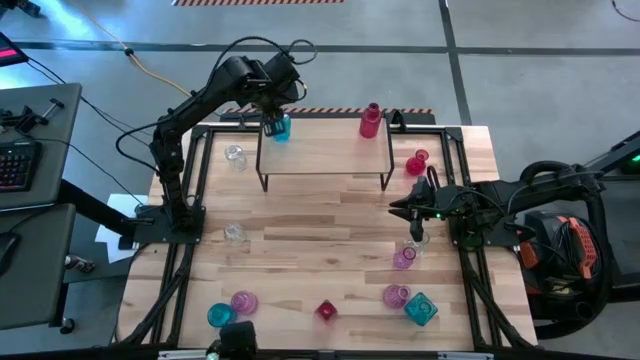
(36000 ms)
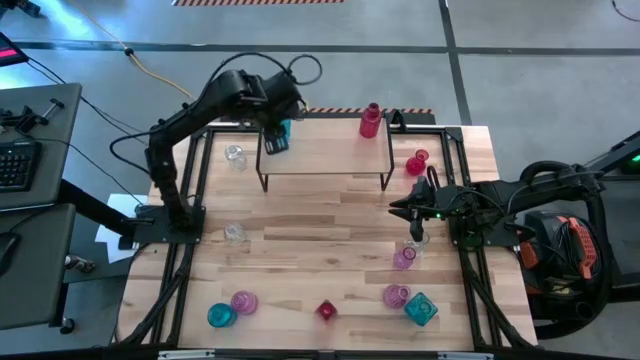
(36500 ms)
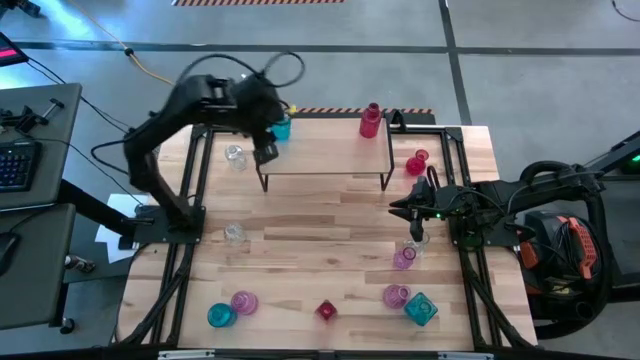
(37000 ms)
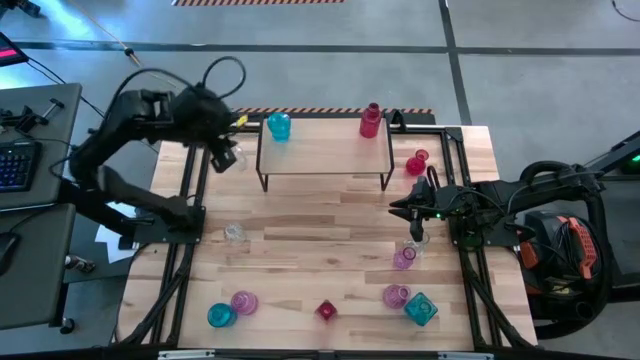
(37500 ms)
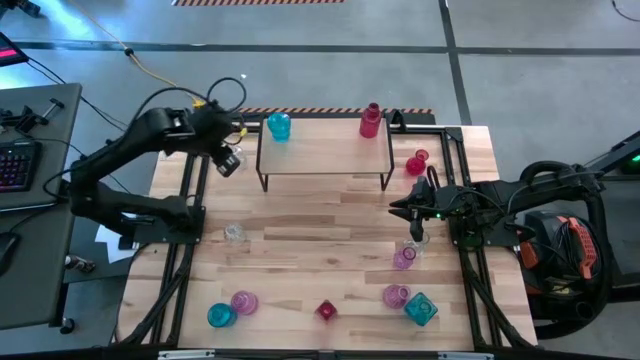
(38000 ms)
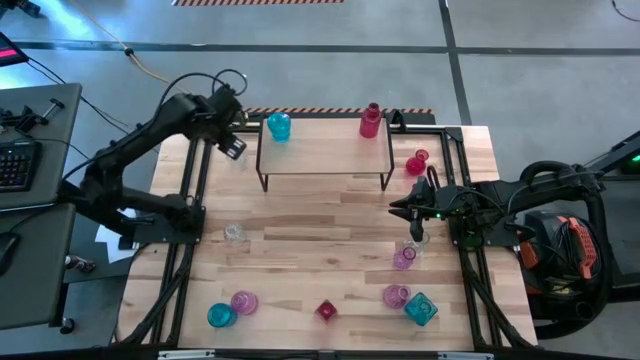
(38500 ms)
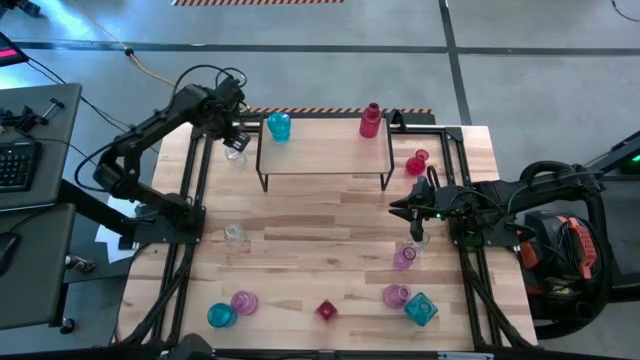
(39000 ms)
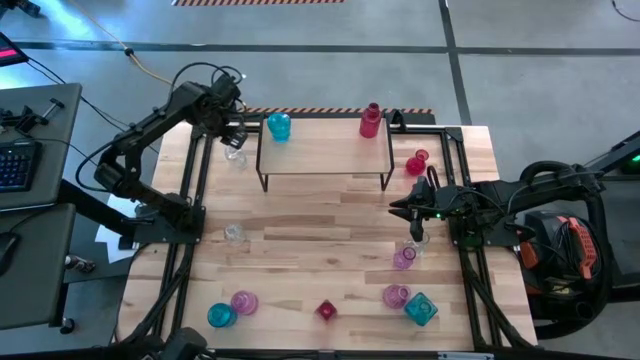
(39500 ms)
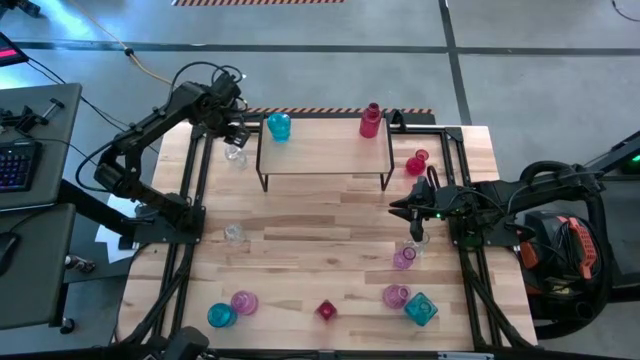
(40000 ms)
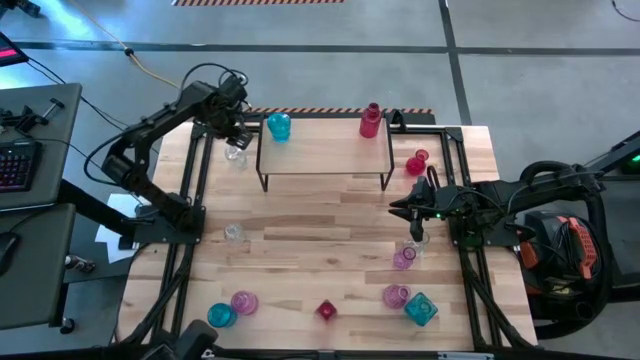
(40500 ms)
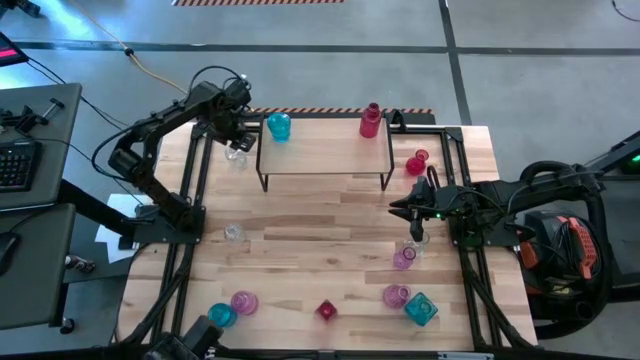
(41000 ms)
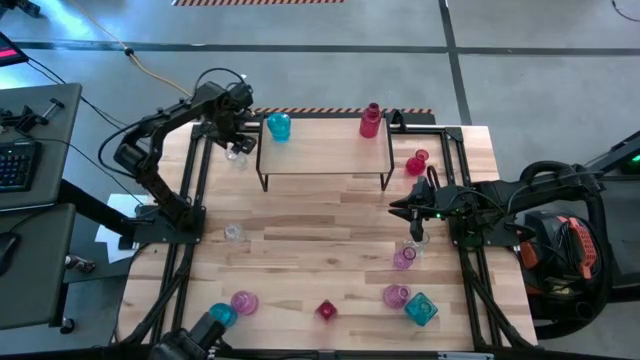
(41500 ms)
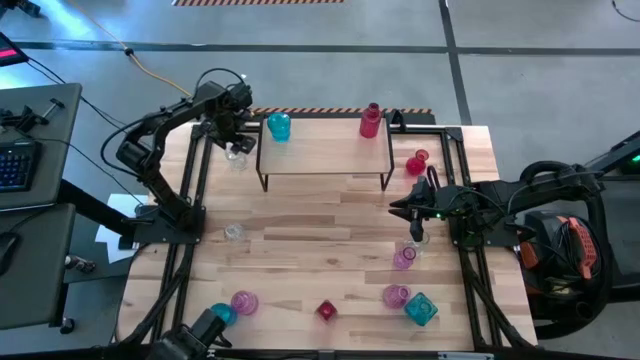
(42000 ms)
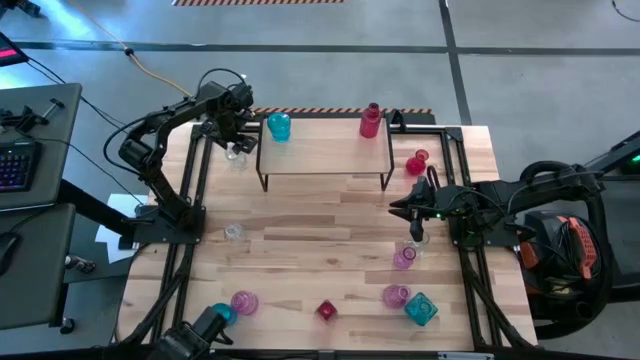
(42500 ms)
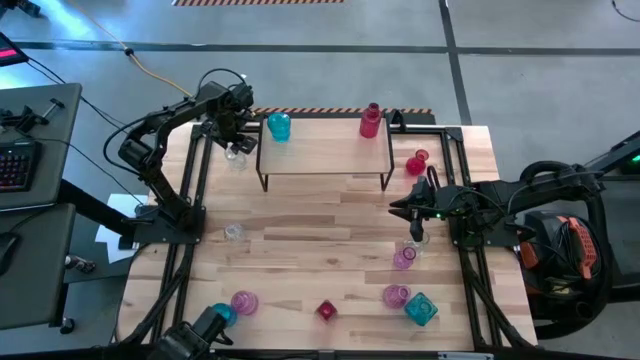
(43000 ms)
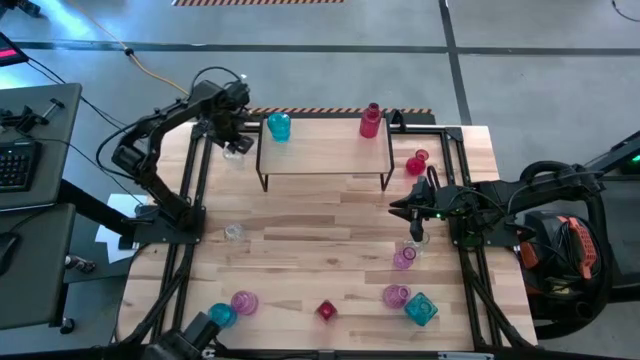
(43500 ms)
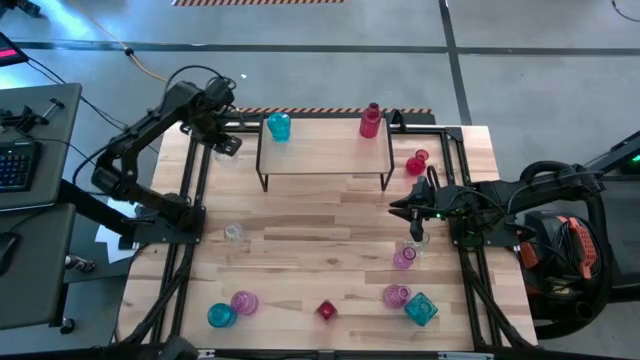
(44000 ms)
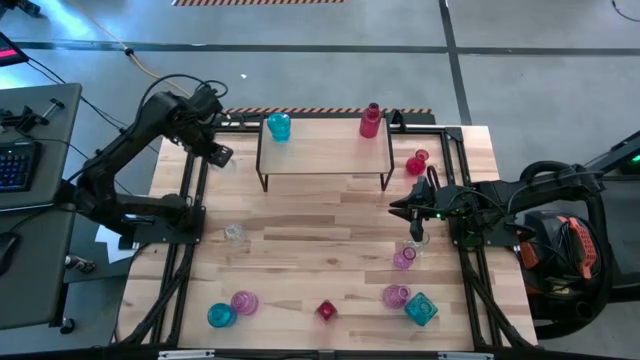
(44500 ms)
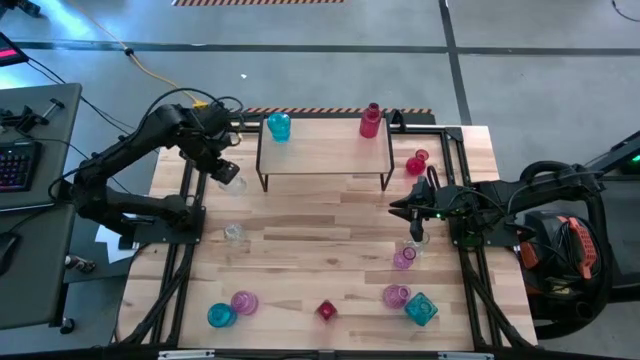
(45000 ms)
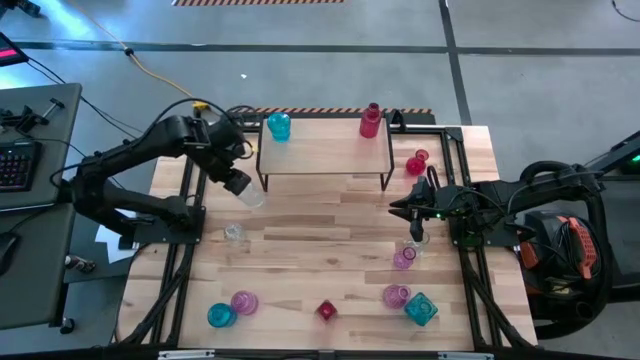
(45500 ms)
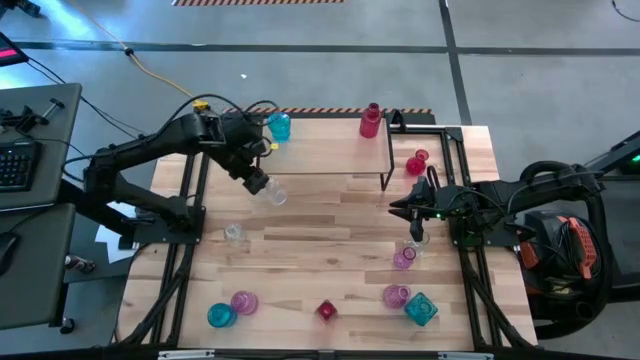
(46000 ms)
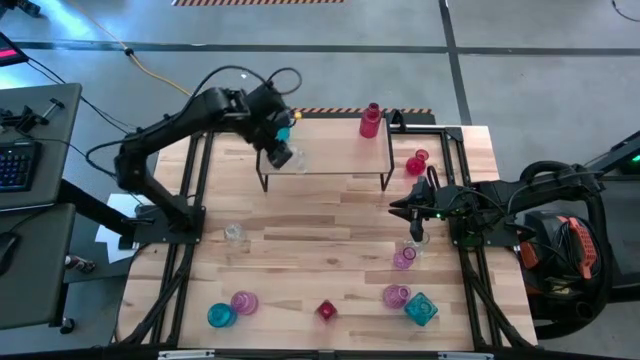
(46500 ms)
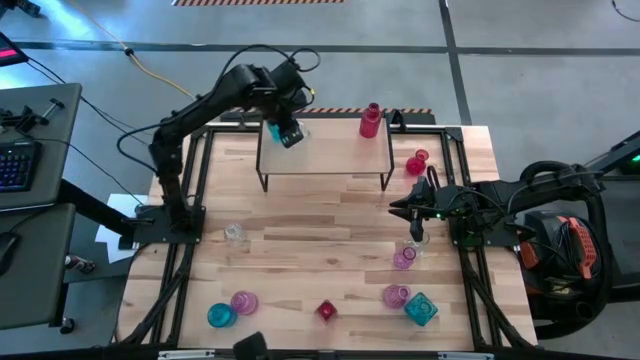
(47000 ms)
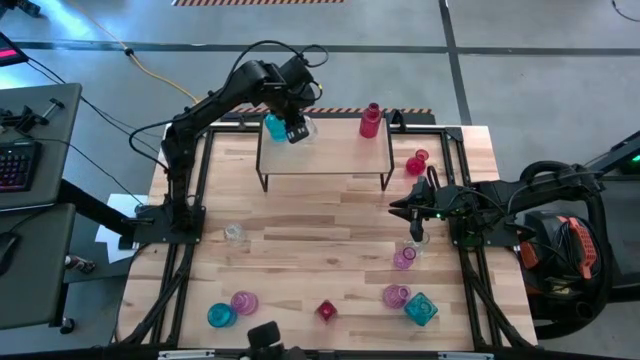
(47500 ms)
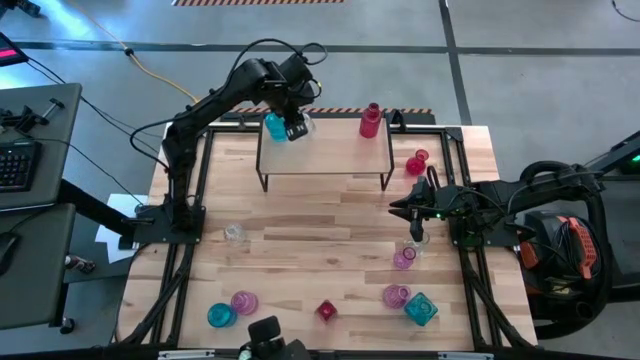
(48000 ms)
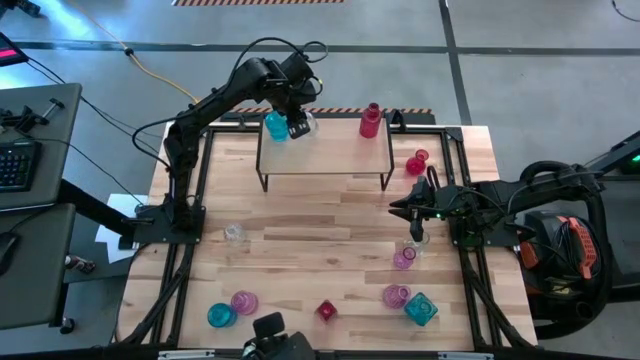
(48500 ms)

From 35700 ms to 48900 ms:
Task: sort vases onto shelf
Put the top left transparent vase on the shelf

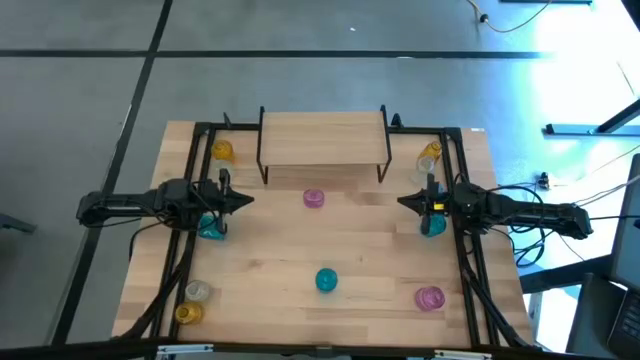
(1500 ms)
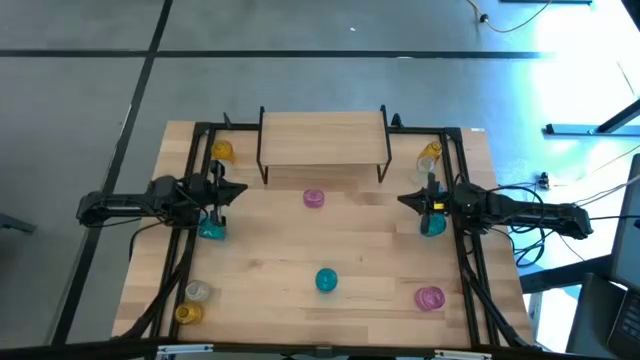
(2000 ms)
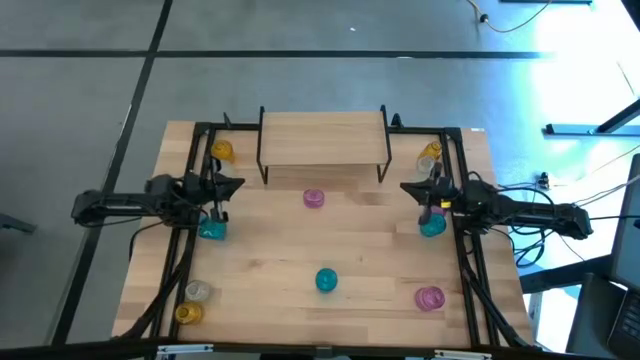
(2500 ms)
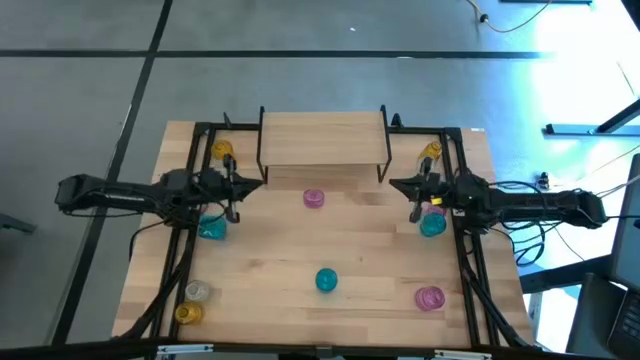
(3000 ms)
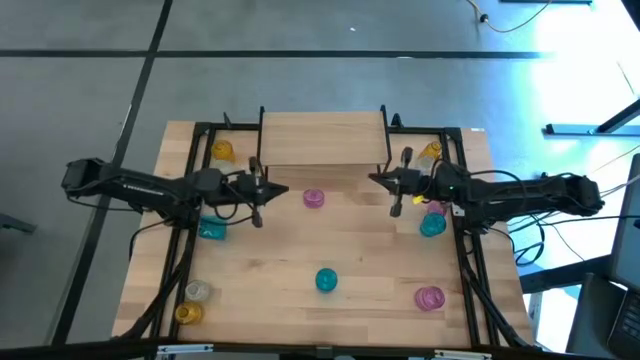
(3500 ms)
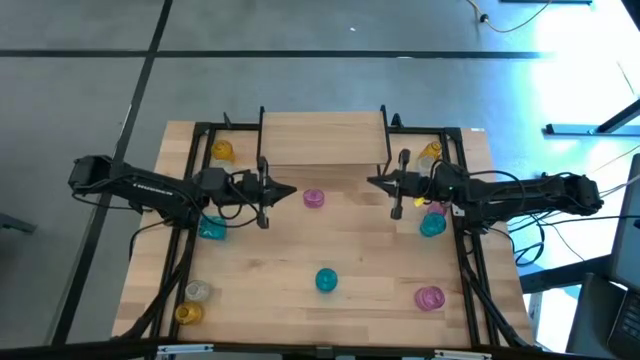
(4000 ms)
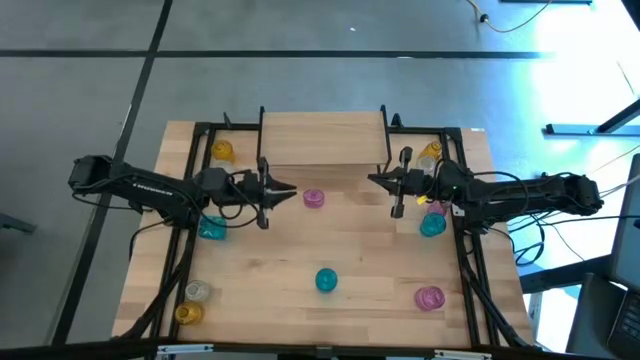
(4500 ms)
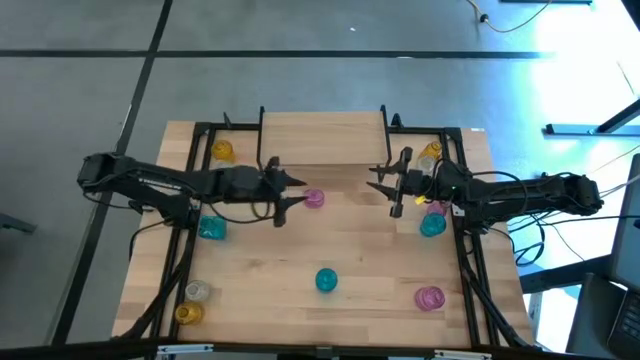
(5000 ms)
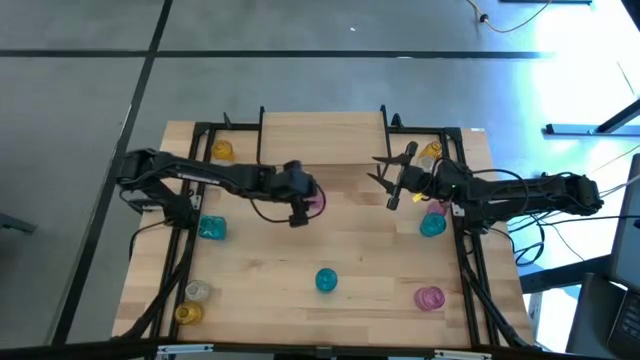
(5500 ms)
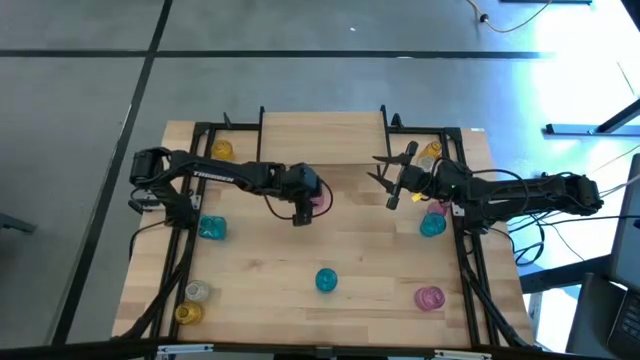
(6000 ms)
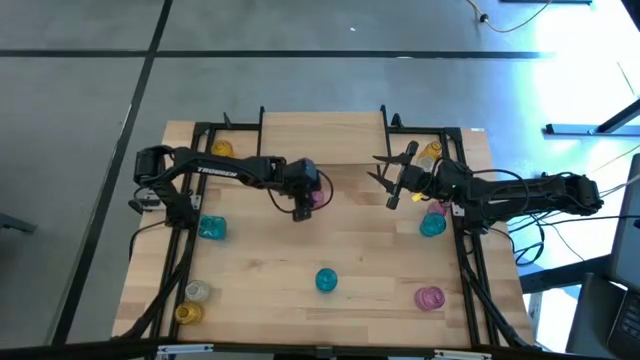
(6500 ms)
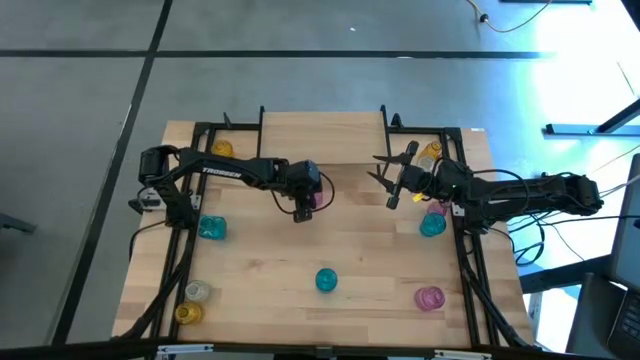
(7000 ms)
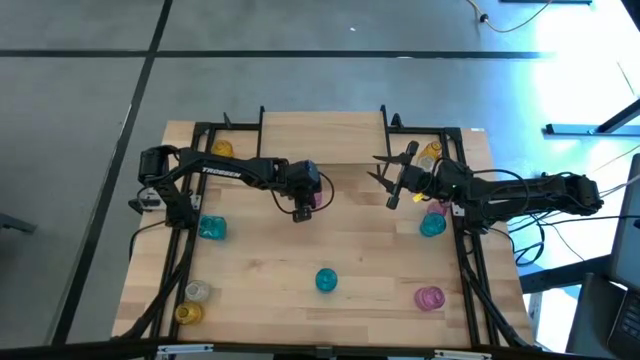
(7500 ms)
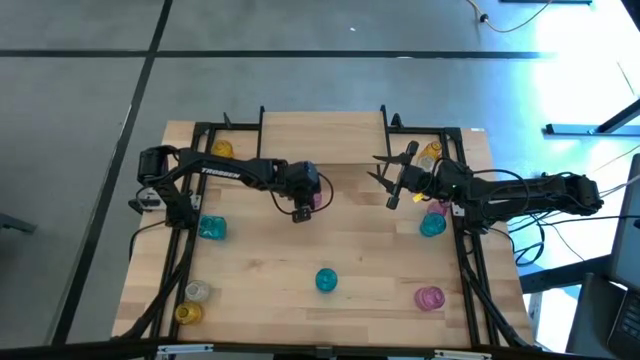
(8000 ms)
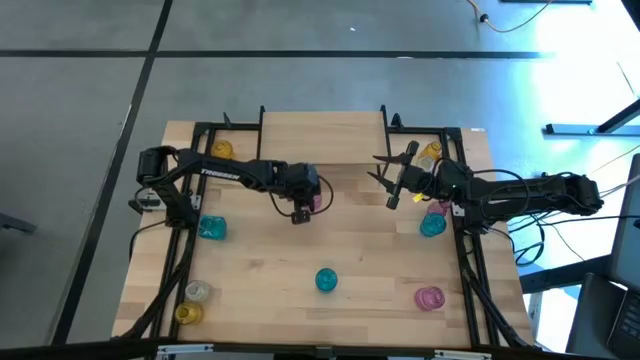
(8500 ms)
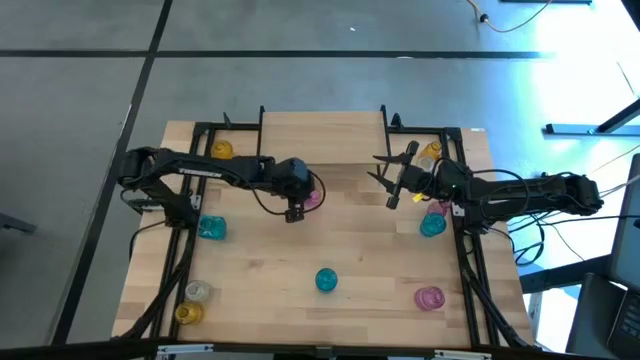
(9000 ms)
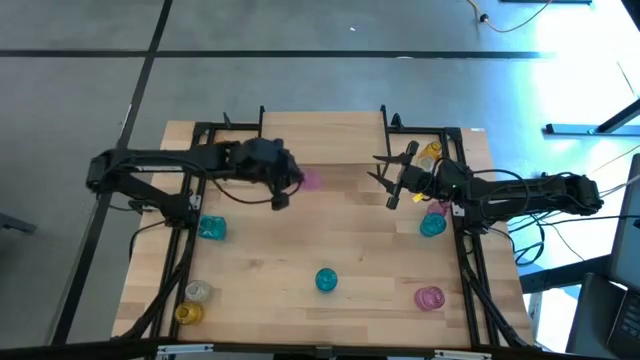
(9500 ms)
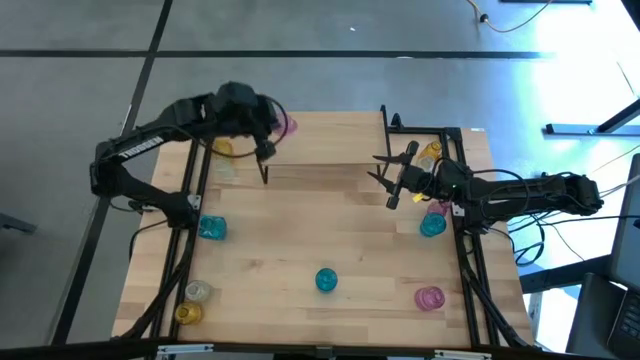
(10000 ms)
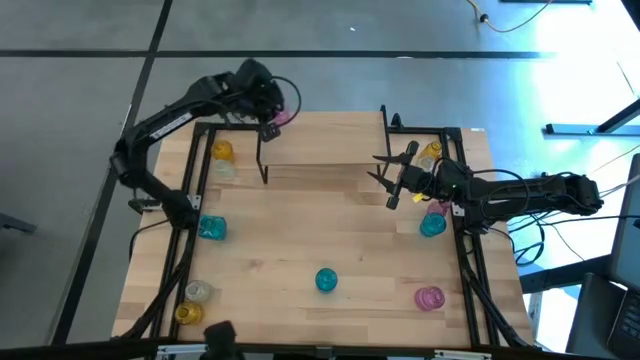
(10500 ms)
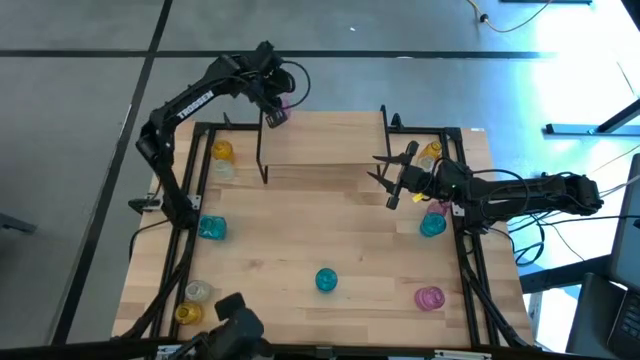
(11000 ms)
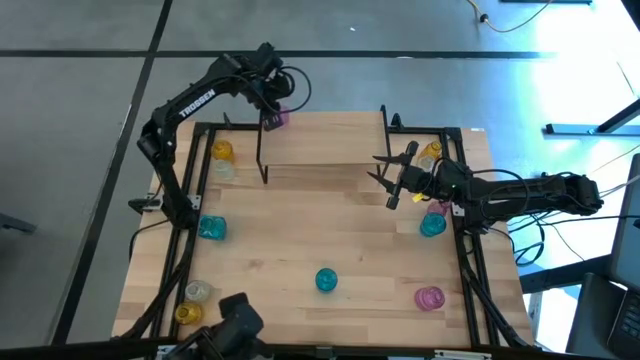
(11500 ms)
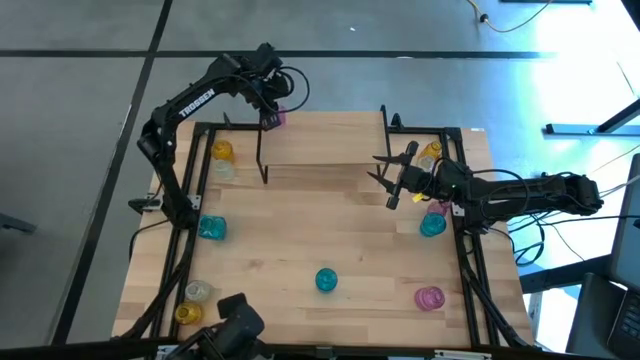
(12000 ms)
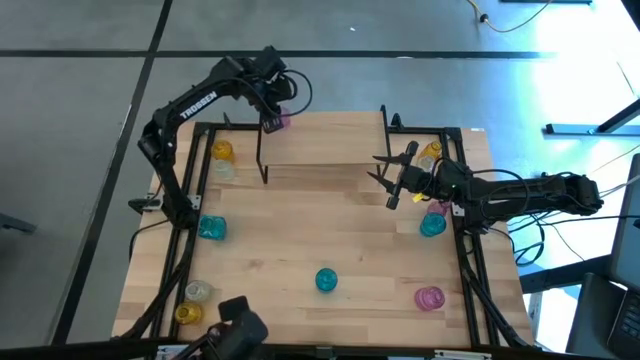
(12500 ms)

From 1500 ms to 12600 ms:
Task: sort vases onto shelf
Put the top left violet flower vase on the shelf
